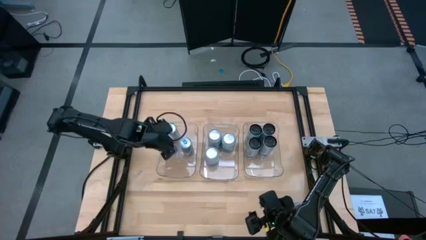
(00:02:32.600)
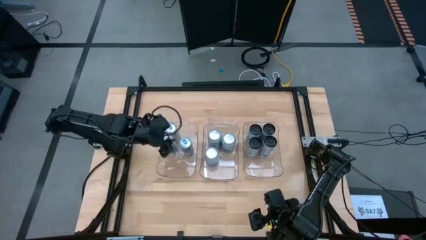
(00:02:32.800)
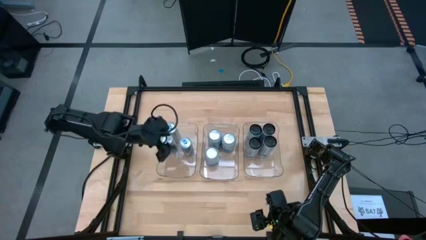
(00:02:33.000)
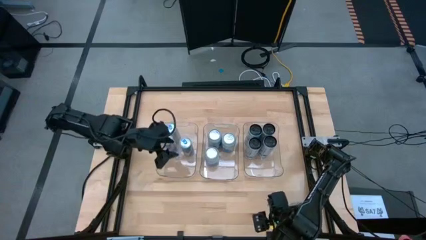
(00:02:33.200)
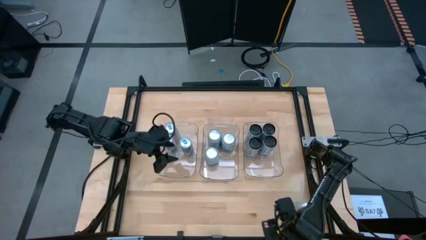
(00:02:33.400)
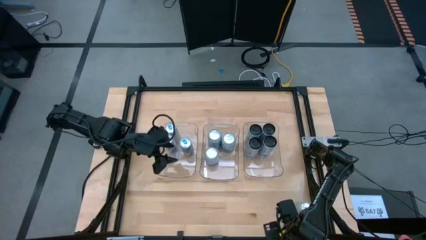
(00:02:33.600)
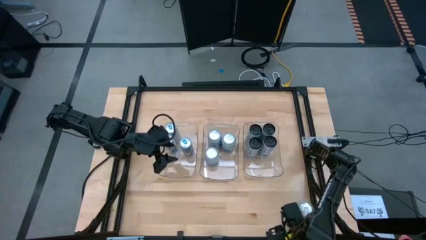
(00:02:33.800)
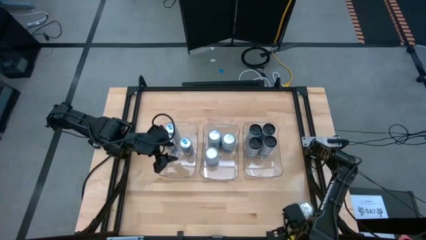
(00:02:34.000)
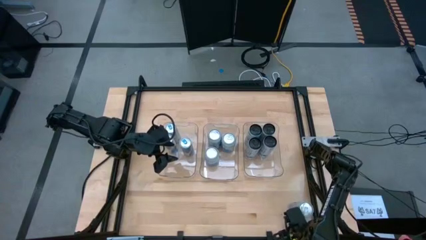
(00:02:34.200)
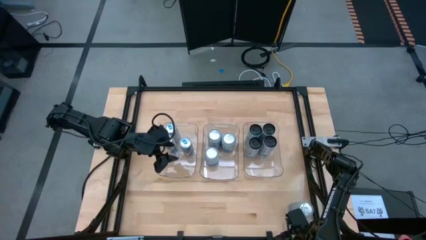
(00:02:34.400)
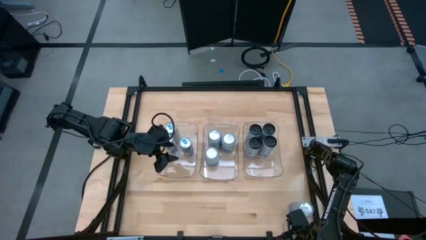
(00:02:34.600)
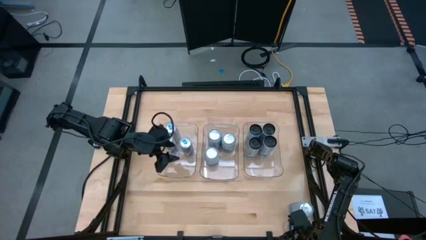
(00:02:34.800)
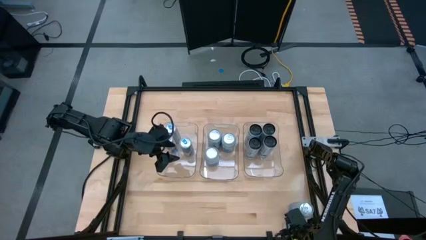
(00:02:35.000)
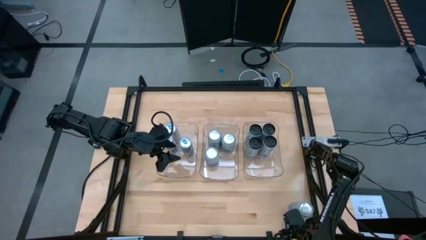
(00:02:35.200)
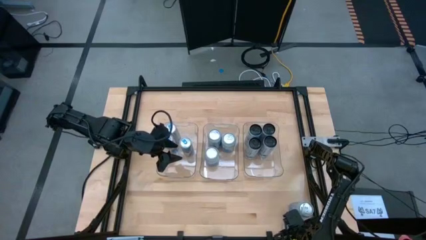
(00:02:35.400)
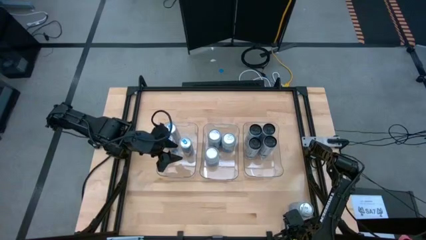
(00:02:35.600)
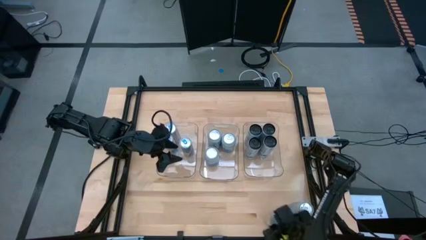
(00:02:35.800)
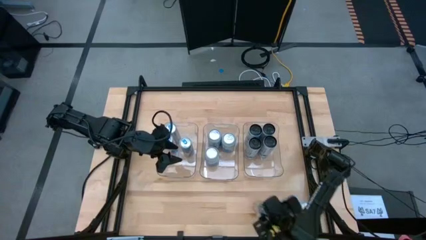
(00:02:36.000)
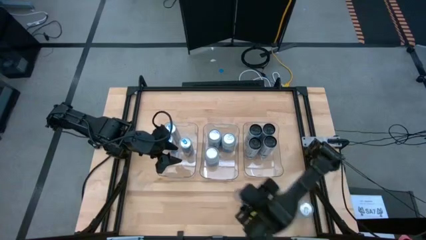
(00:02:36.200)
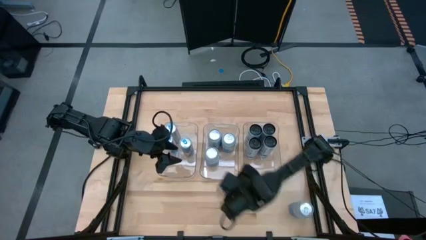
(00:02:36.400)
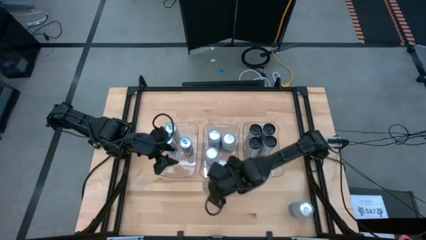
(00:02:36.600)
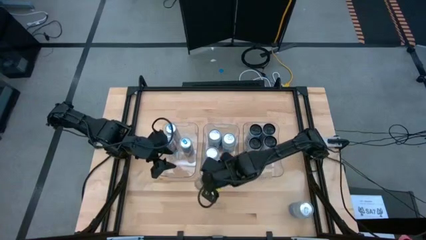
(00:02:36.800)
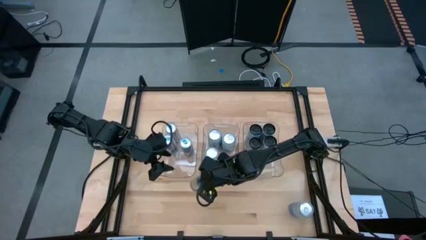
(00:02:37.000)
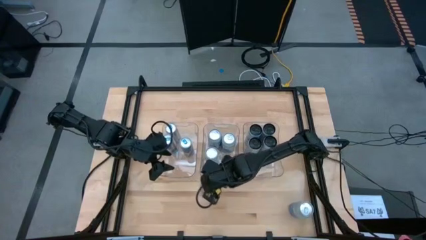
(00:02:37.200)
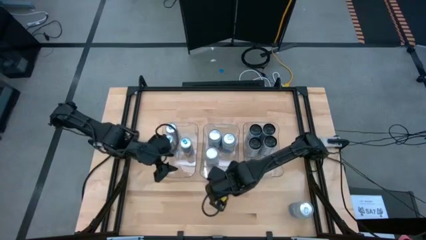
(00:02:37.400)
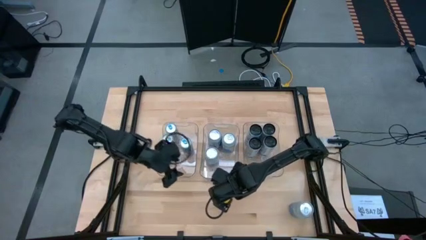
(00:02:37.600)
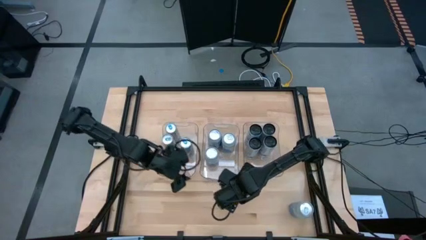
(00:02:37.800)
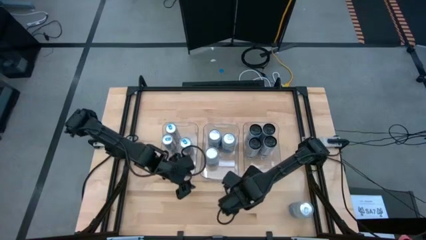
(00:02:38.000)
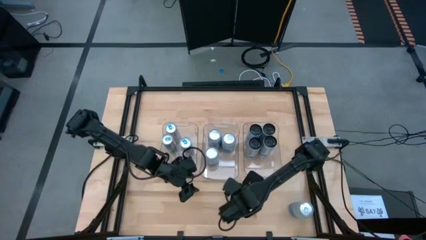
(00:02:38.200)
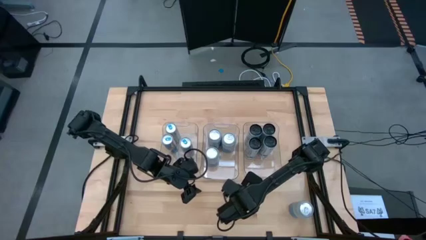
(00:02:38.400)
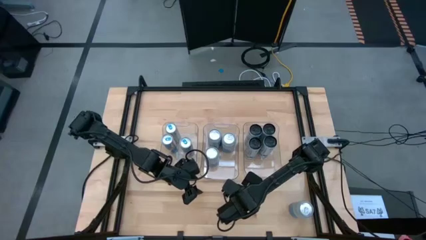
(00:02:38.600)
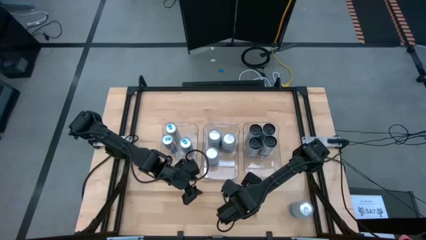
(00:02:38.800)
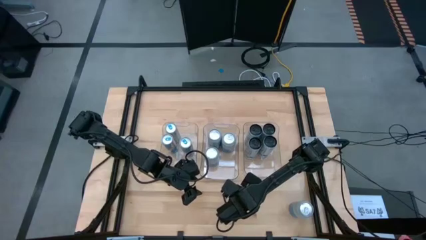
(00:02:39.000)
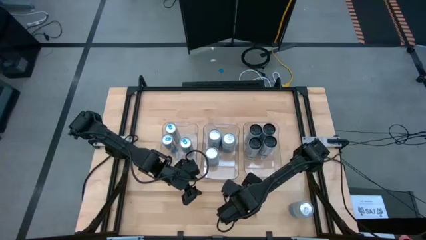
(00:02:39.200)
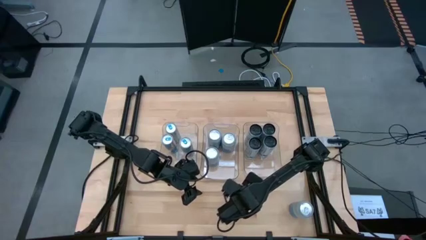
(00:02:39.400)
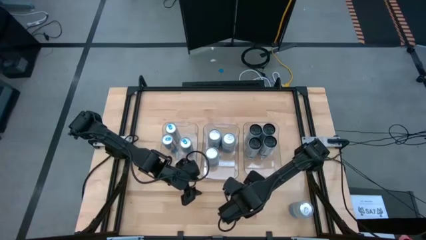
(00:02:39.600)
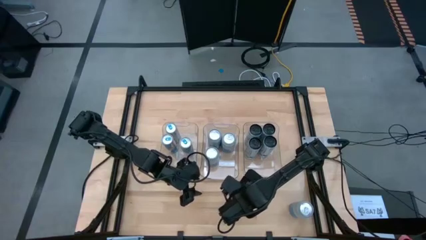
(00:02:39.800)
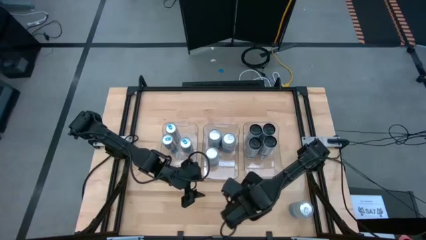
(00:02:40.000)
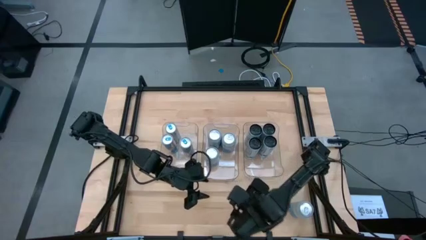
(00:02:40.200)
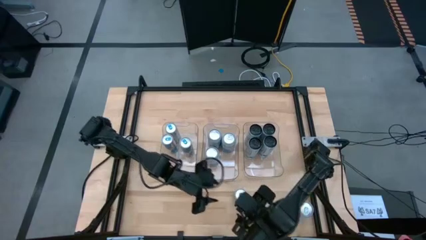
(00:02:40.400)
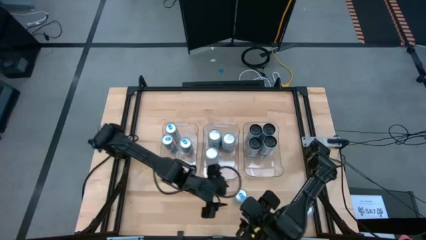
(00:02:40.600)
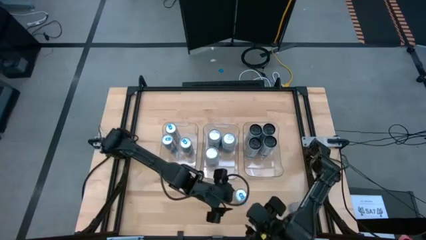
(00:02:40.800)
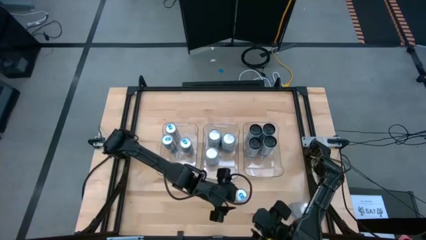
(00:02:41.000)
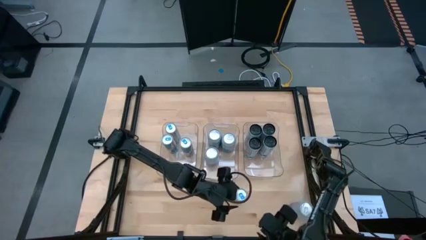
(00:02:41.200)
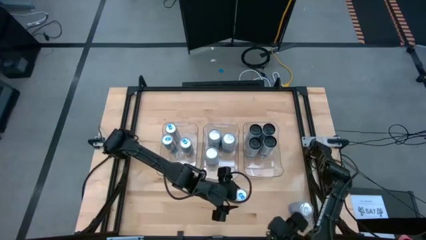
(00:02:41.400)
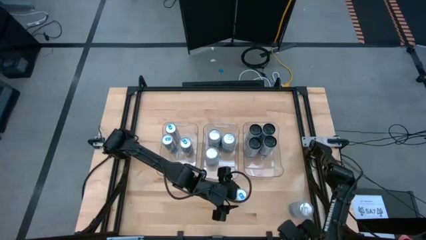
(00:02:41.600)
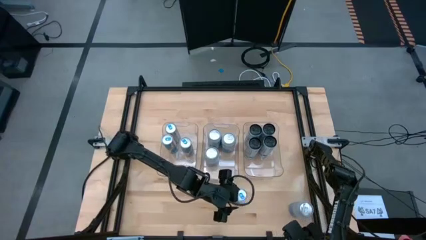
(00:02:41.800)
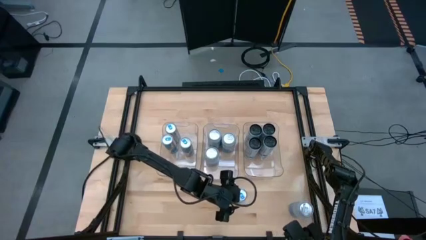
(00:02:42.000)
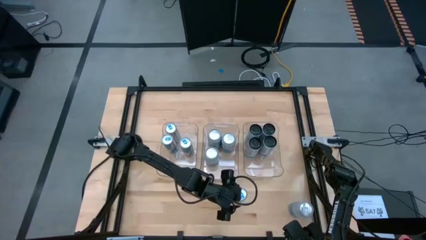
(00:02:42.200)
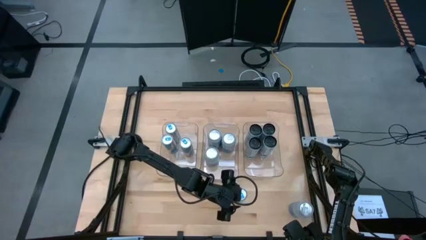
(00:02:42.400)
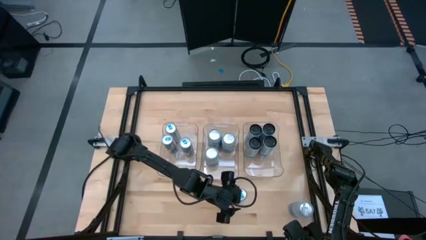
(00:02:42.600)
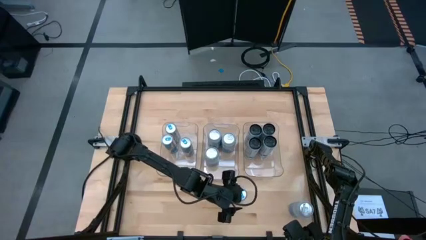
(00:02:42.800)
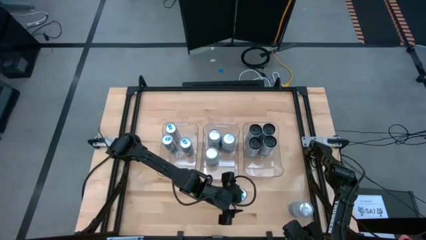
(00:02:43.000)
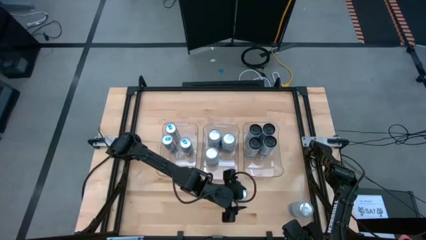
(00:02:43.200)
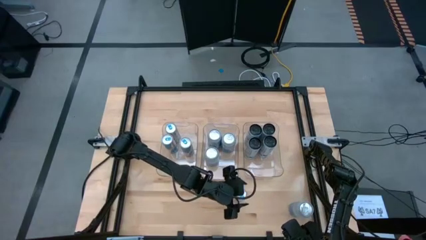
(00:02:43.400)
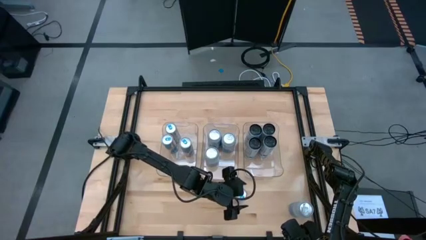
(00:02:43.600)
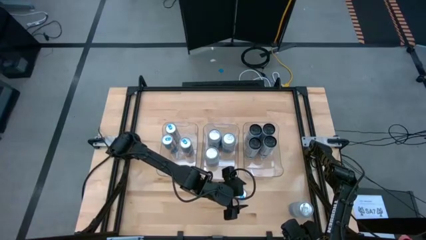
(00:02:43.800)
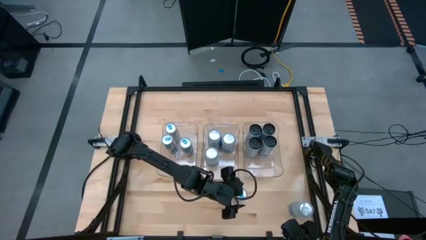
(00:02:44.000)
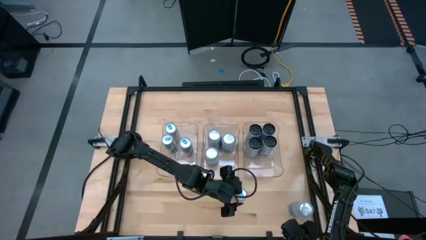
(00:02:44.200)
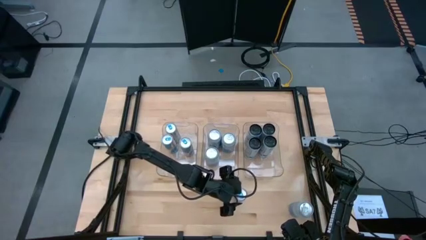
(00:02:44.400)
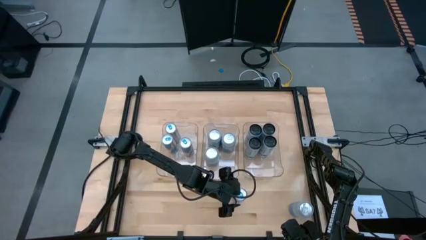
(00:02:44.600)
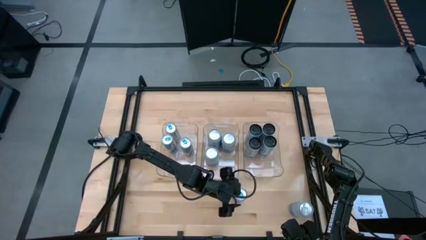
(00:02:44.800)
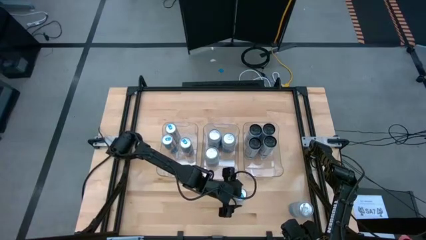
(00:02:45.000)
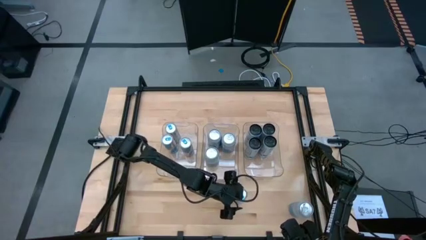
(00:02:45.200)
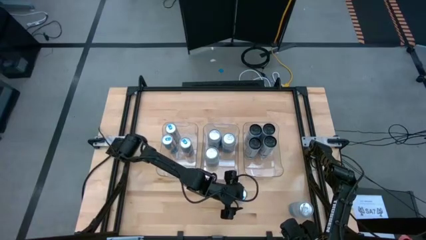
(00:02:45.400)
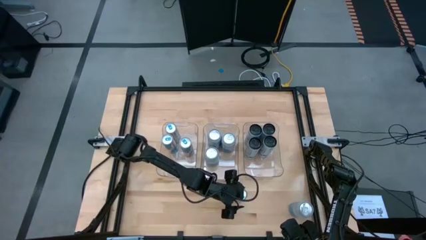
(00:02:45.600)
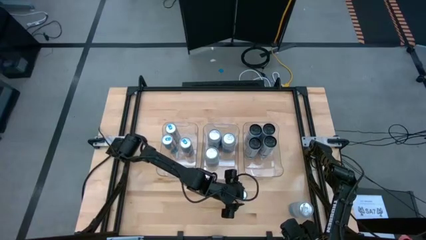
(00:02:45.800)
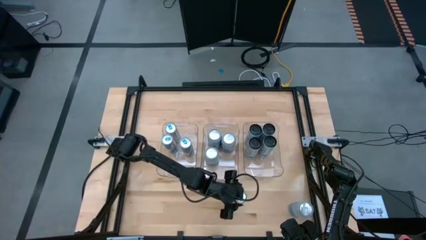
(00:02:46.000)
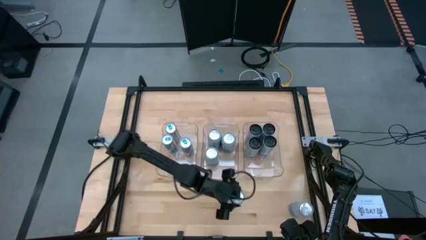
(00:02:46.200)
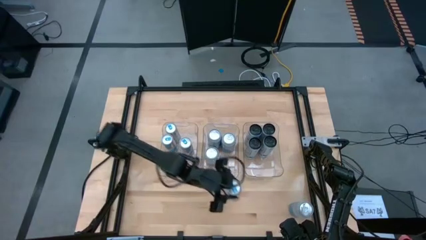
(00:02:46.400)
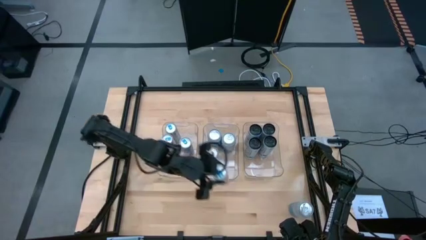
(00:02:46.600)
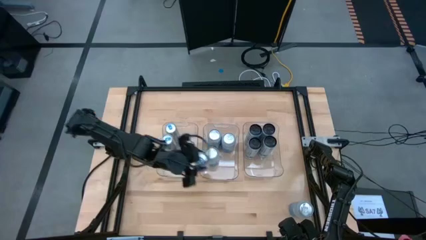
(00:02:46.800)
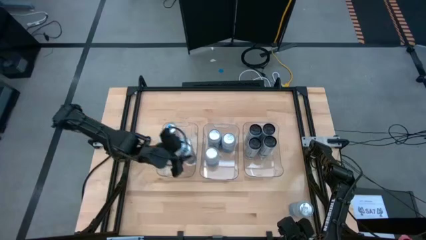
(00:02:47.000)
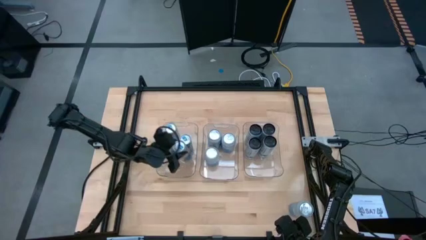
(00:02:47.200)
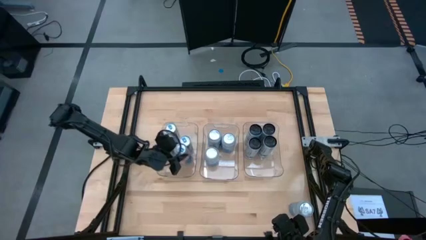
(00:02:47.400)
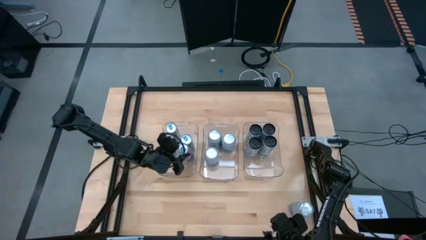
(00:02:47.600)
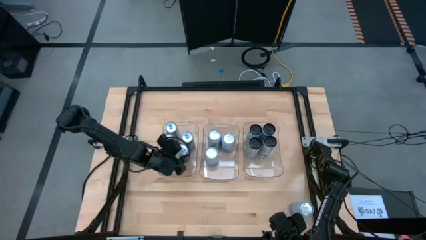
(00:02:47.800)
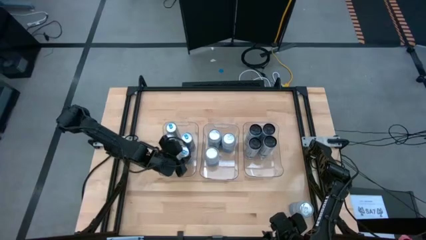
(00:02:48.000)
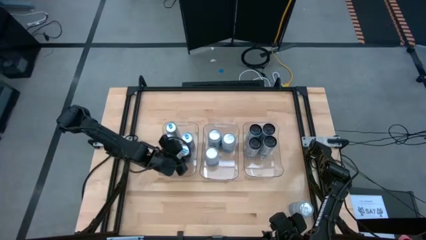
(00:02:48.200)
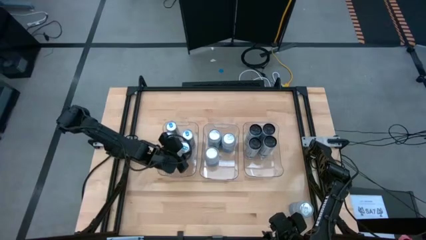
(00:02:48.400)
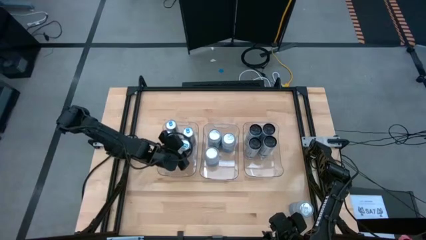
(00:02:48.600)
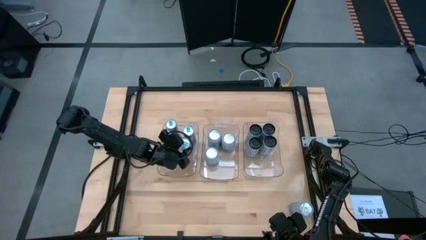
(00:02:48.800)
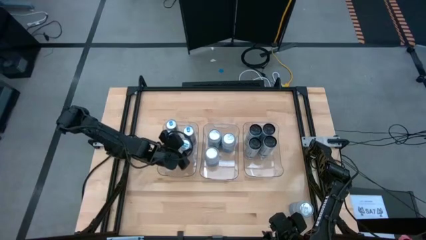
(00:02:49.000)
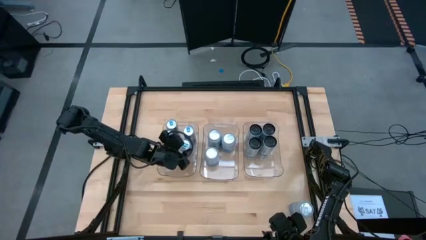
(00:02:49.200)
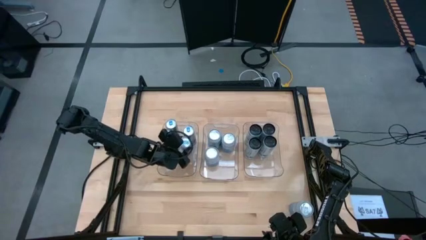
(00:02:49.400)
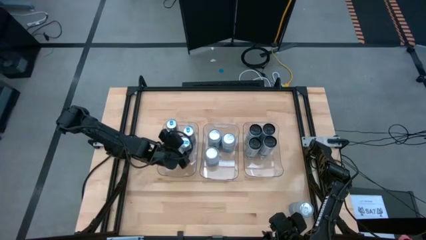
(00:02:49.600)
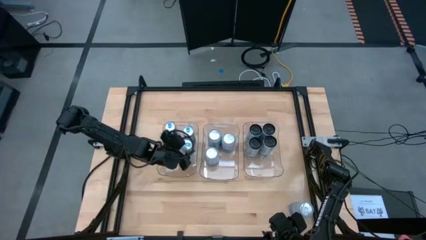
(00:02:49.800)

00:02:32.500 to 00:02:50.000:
Task: Sort soda cans
Put the blue soda can into the left transparent bin
